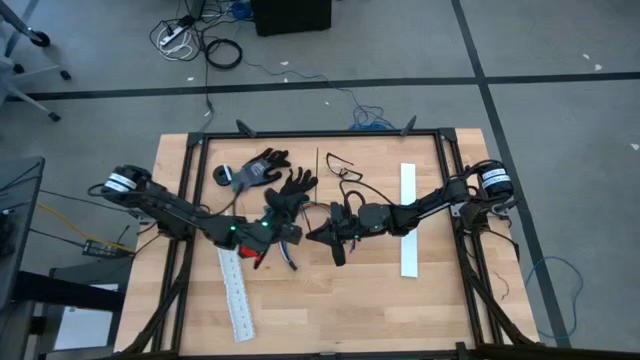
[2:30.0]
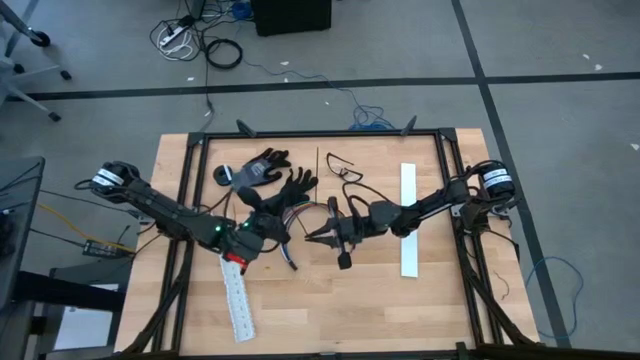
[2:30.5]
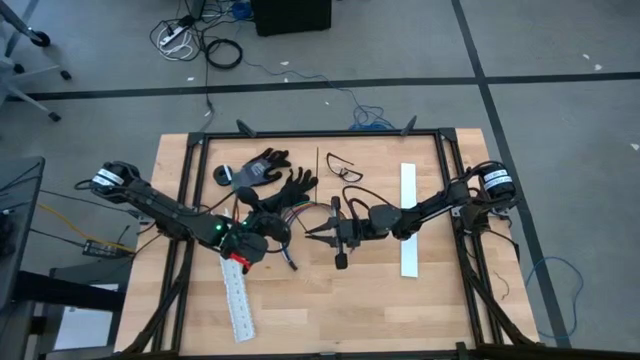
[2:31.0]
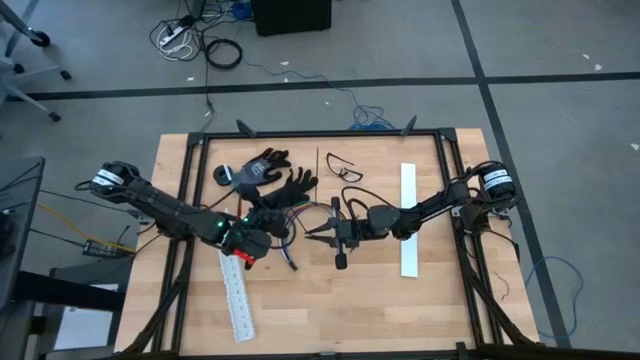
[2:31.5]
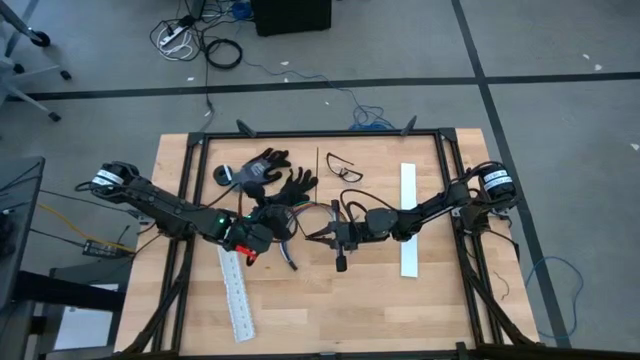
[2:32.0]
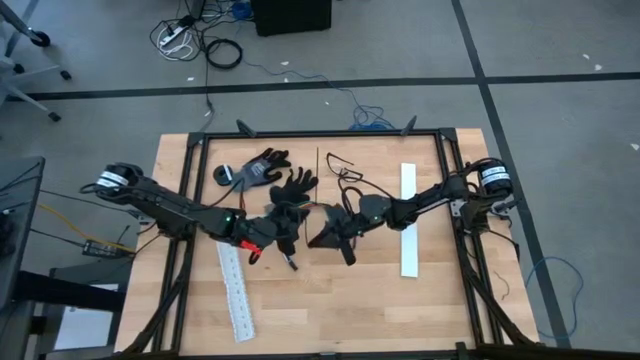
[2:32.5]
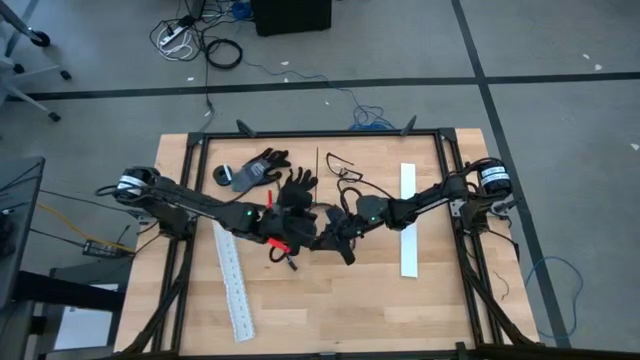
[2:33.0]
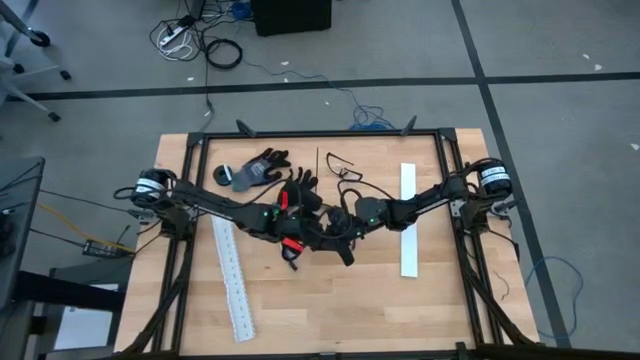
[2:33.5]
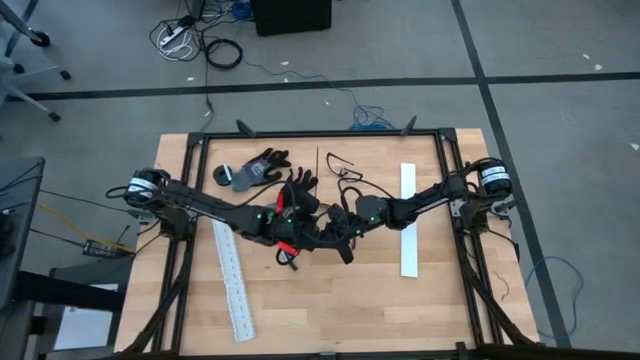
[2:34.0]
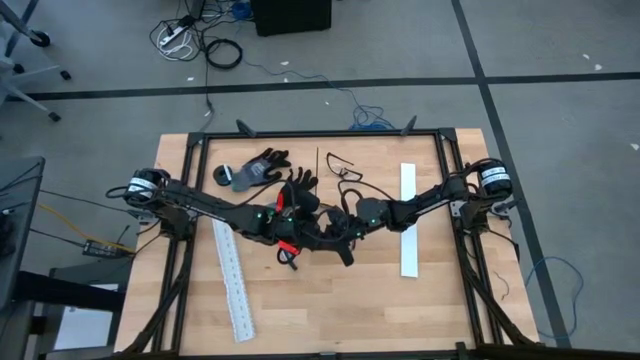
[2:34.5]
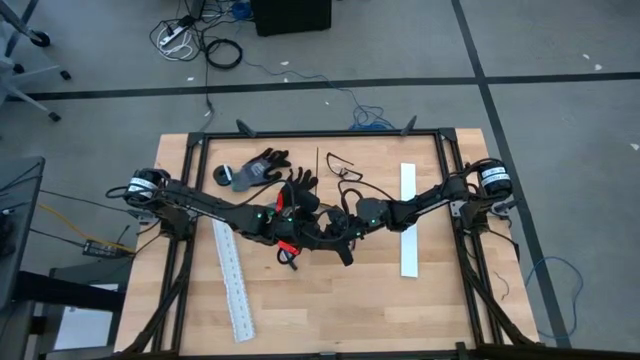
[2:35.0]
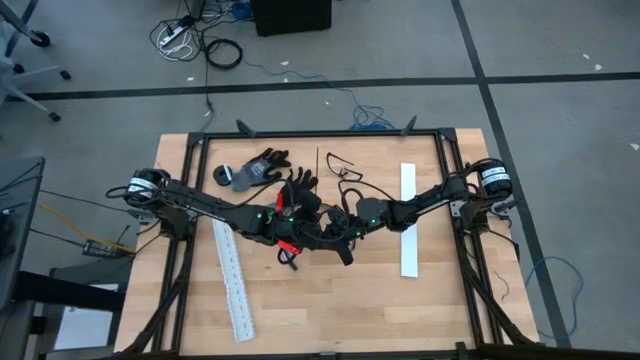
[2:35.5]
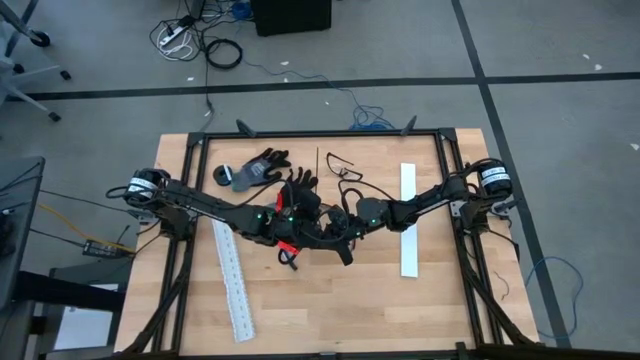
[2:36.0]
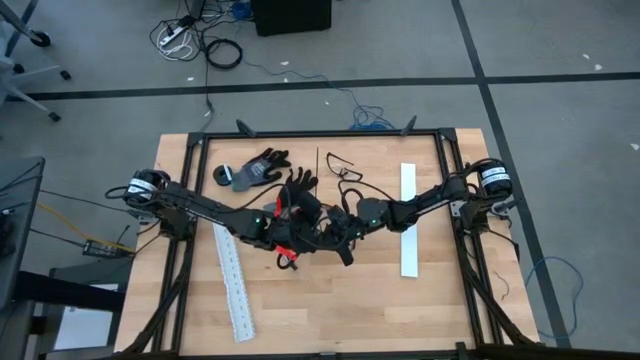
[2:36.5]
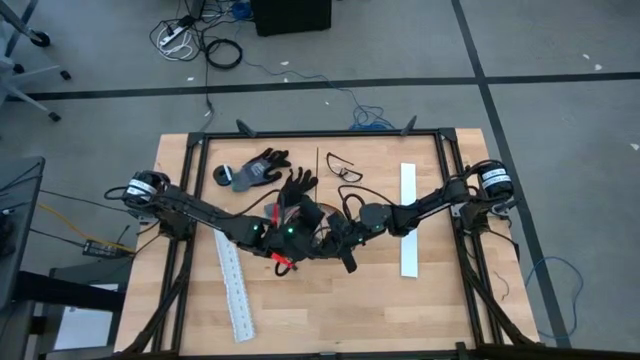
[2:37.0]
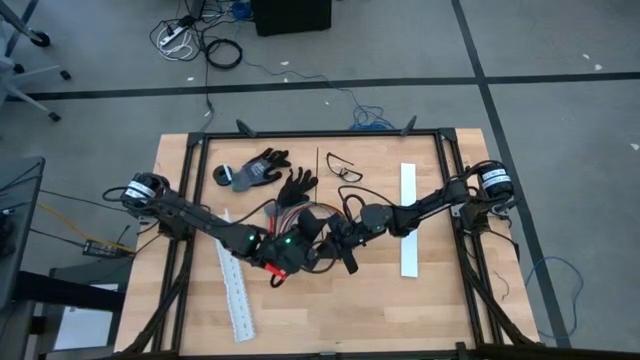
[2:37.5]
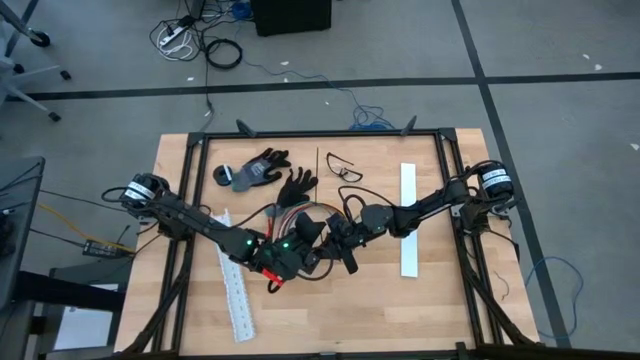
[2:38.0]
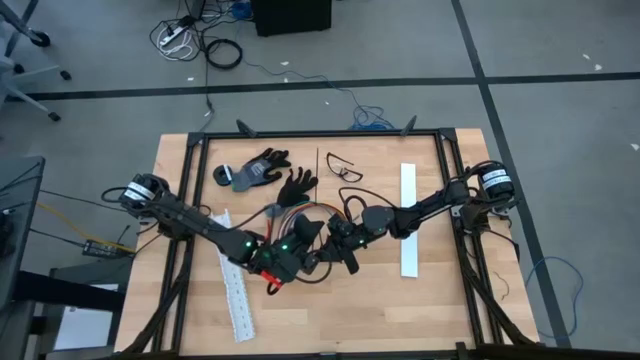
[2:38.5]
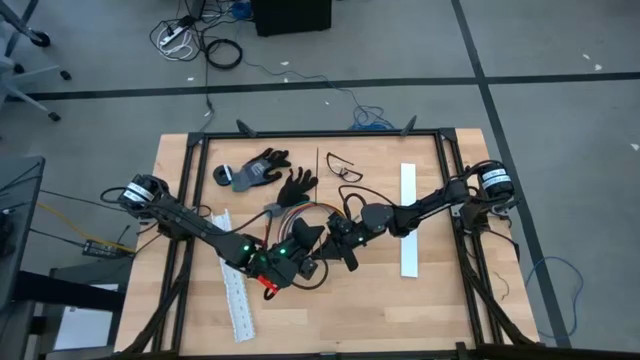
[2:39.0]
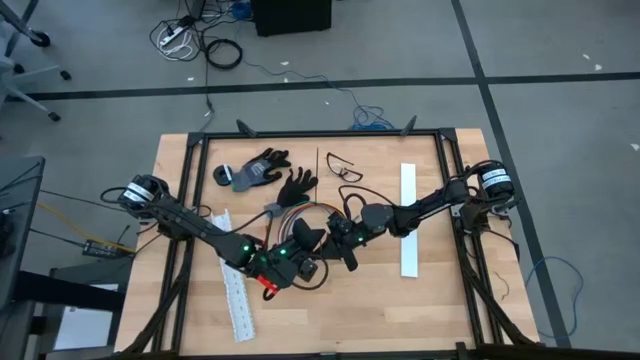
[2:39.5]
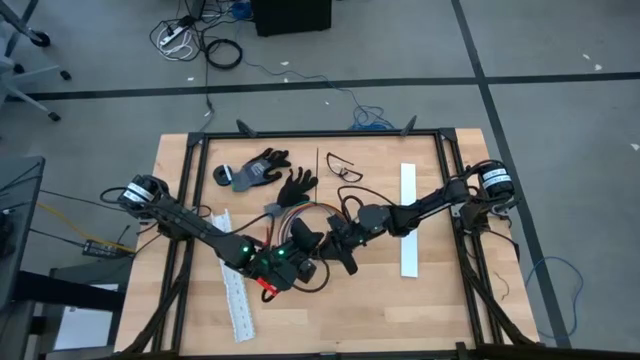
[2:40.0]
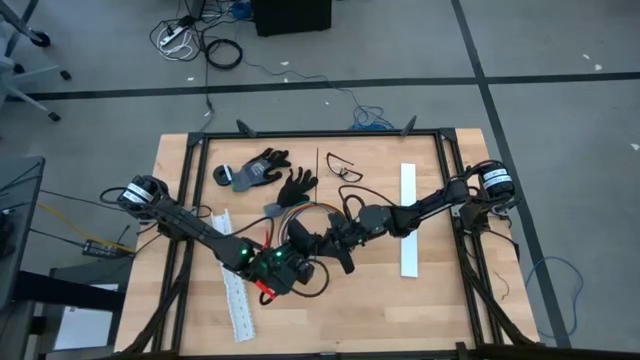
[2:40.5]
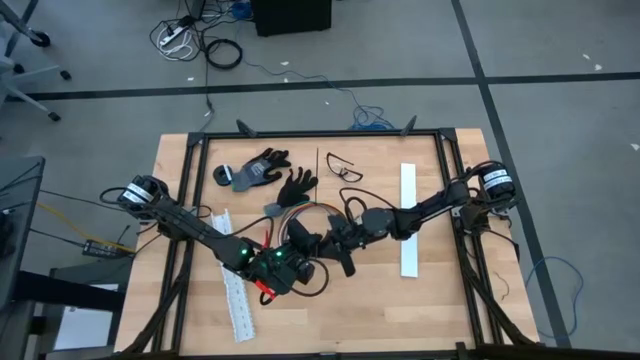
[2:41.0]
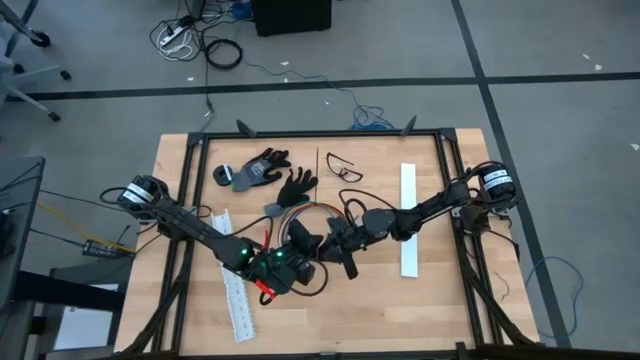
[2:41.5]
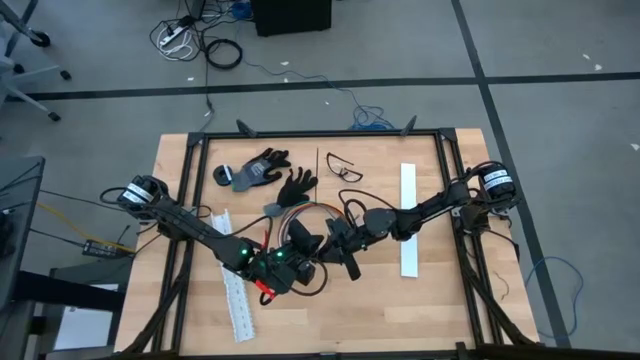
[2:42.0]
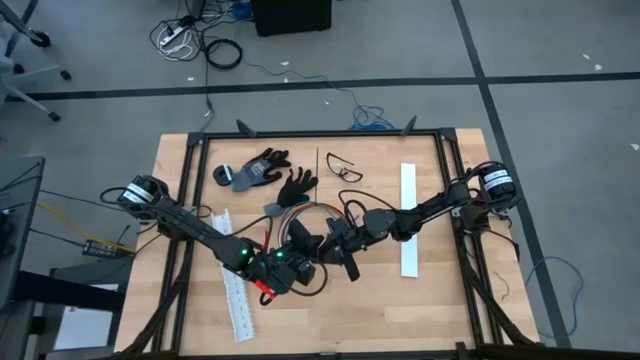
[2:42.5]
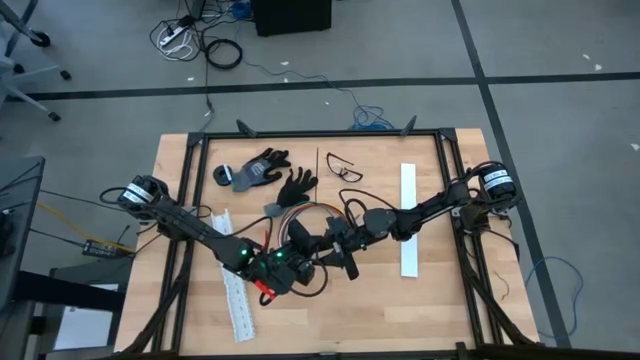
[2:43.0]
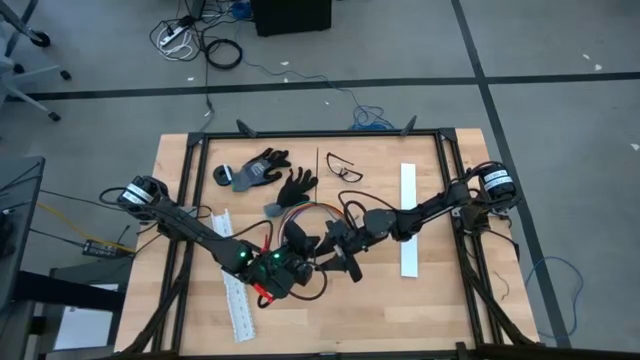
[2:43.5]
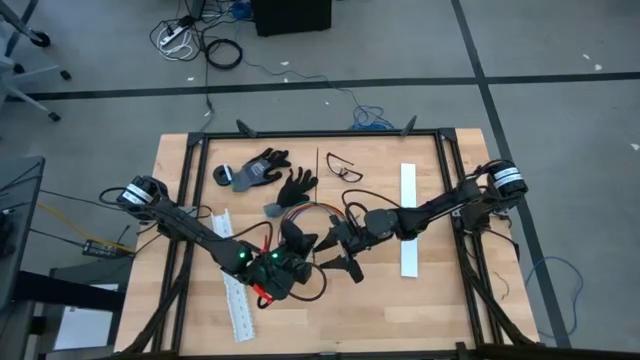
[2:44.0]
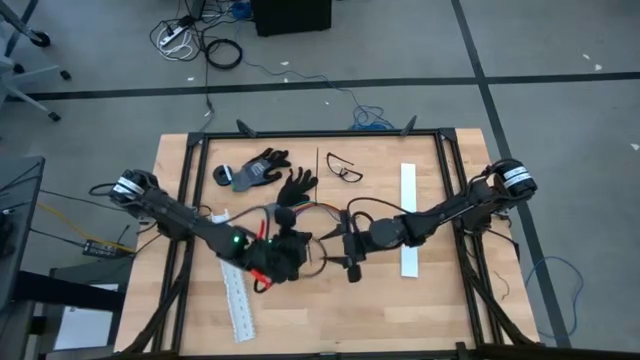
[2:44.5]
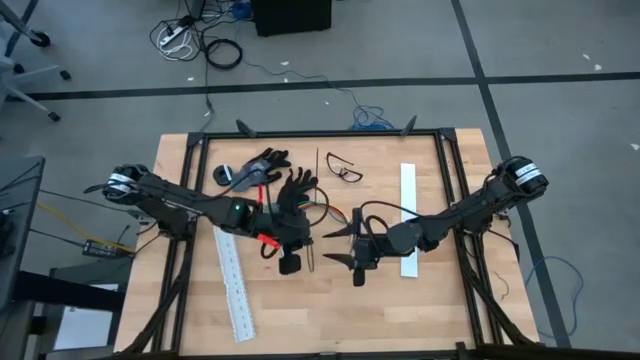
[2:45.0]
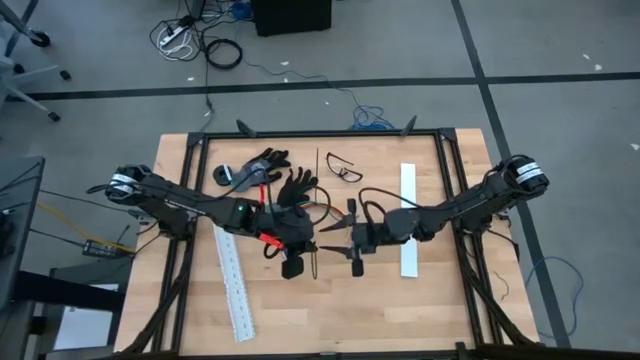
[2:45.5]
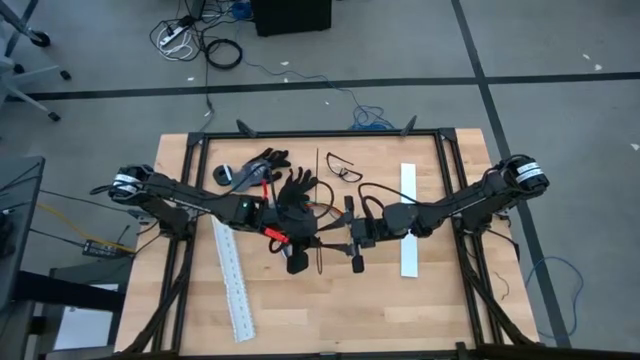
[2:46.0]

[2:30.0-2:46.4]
Task: Ziptie cables
Insert the black zip tie pointed tail end through the slot to form a loop

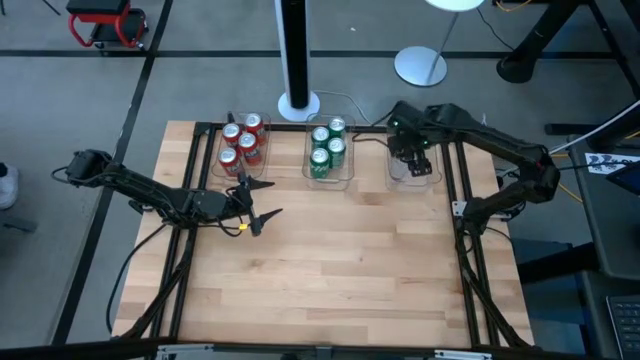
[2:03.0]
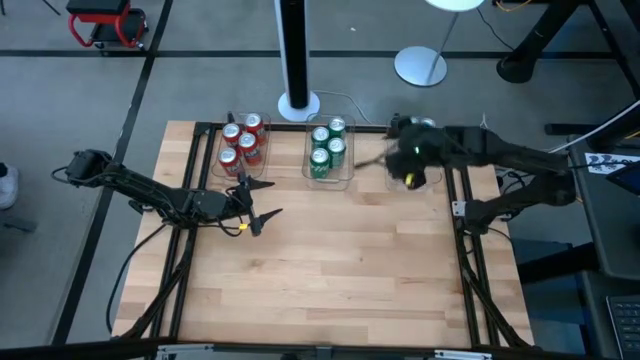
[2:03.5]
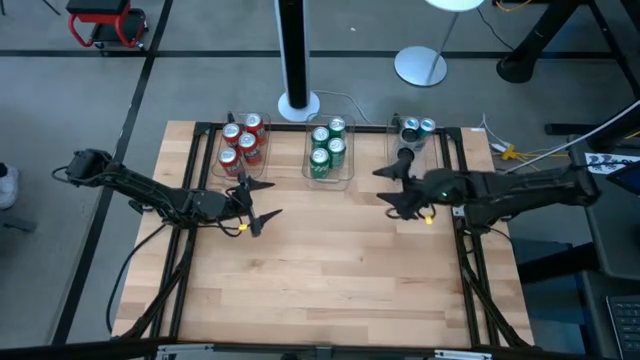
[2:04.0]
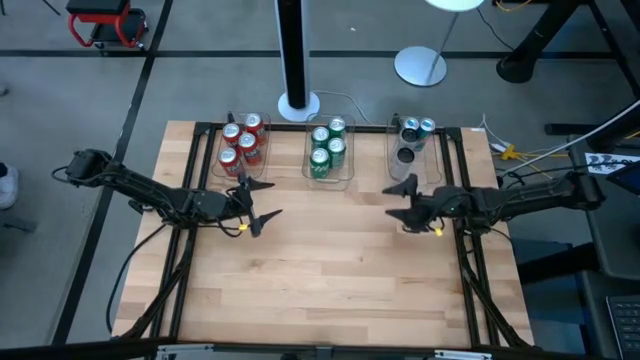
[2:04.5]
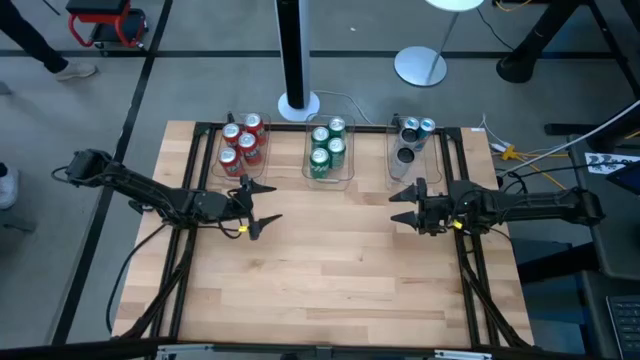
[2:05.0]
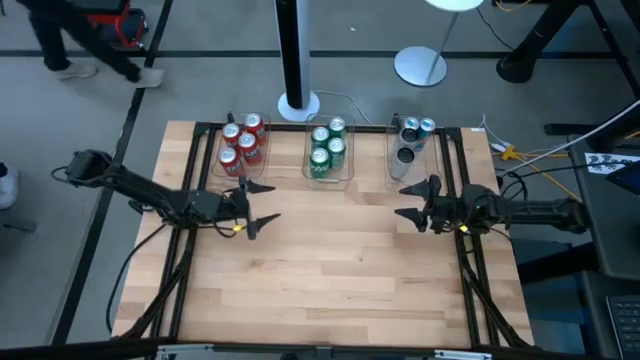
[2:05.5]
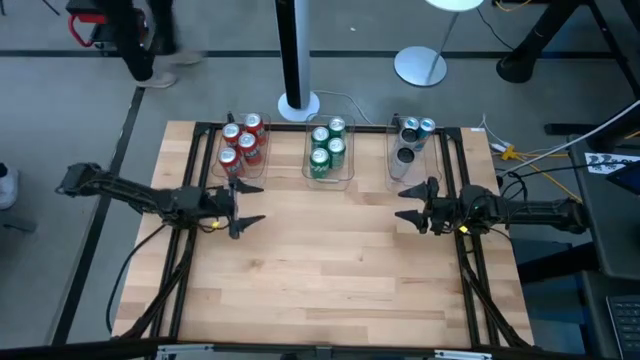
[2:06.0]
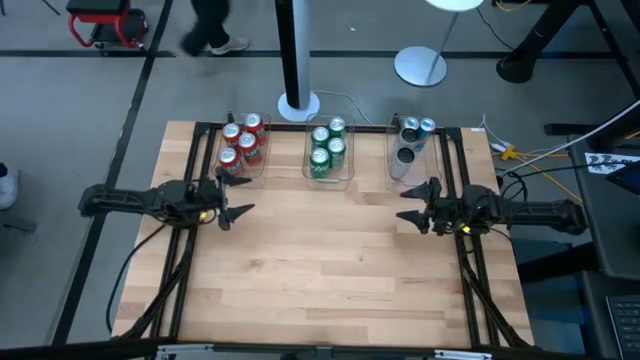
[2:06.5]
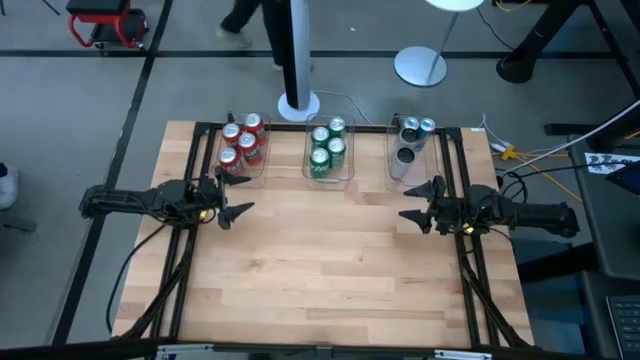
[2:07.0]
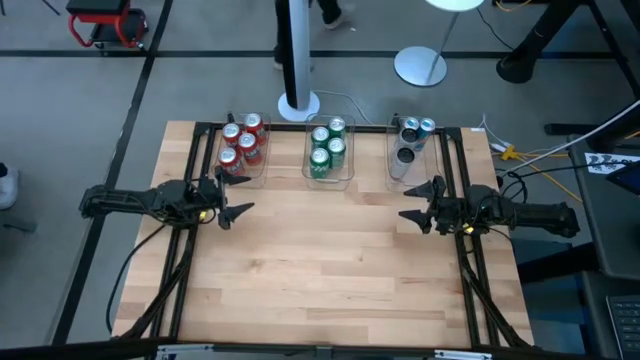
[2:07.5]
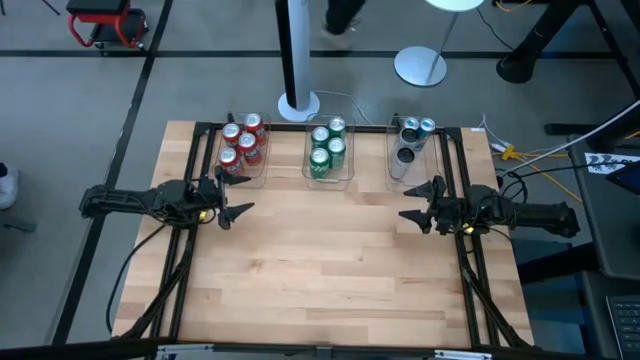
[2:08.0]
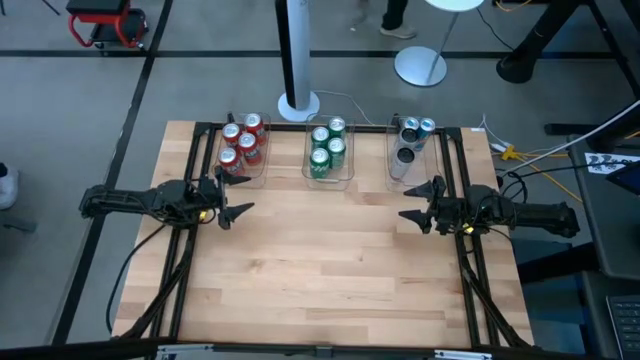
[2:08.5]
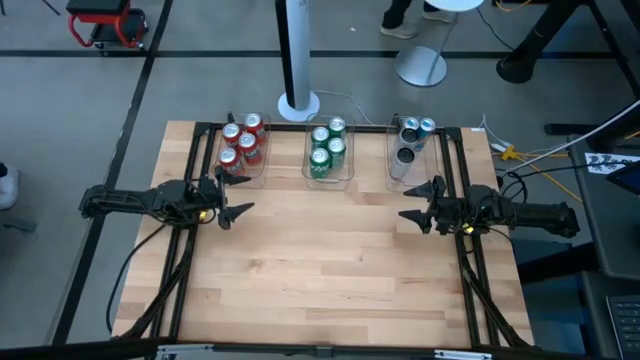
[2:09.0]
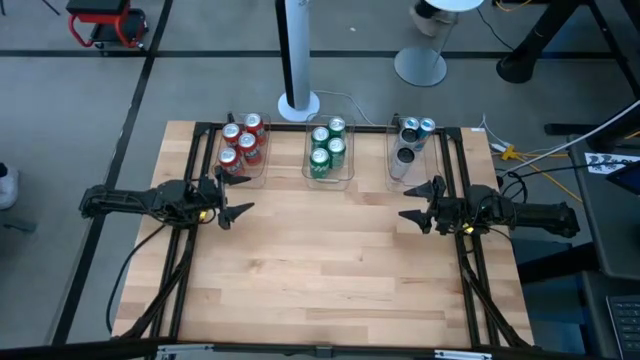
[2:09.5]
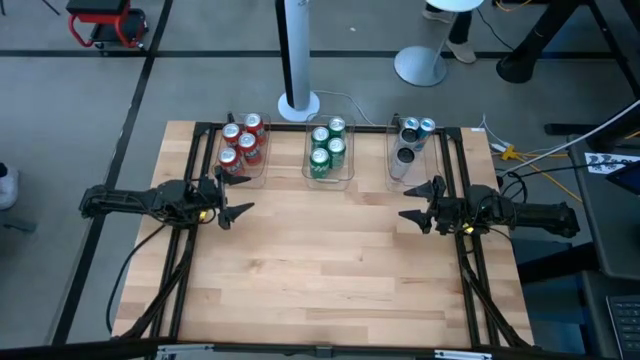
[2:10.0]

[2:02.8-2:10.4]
Task: Sort soda cans
Return to Home Position
